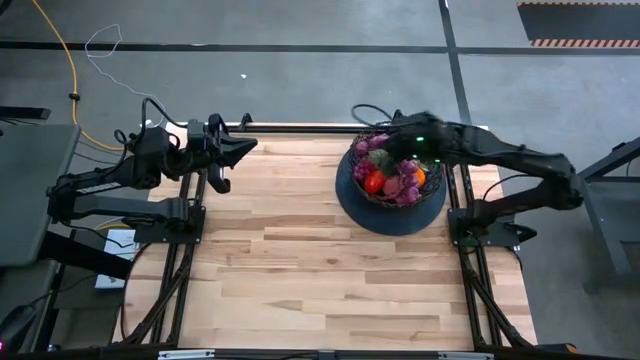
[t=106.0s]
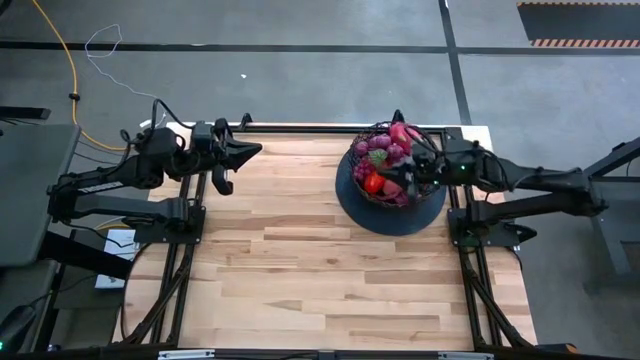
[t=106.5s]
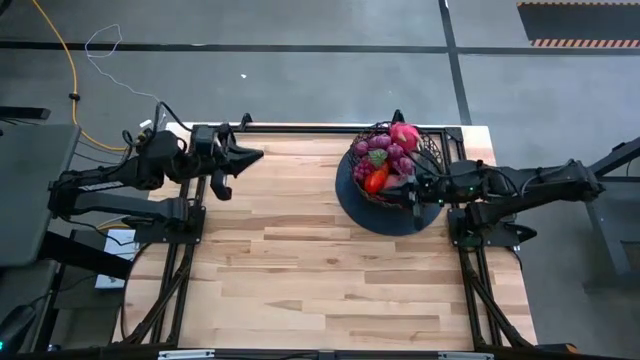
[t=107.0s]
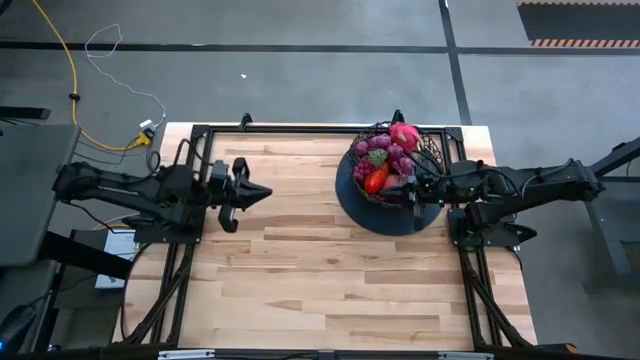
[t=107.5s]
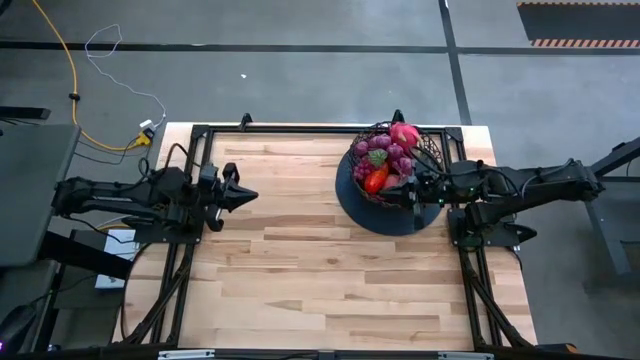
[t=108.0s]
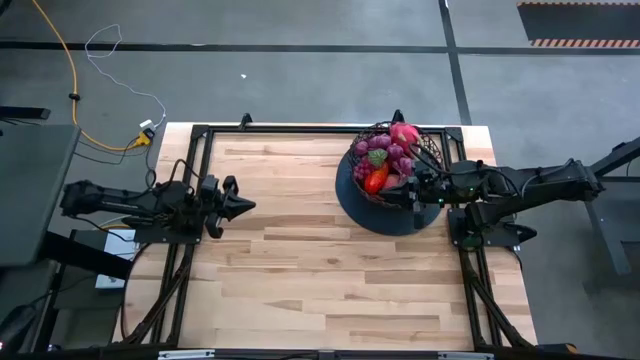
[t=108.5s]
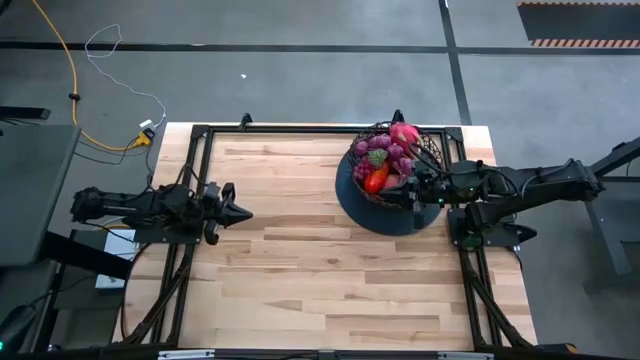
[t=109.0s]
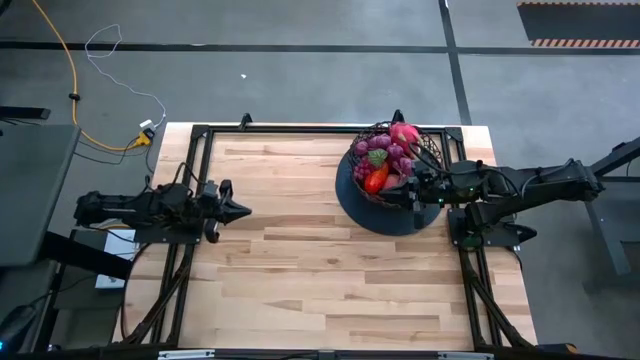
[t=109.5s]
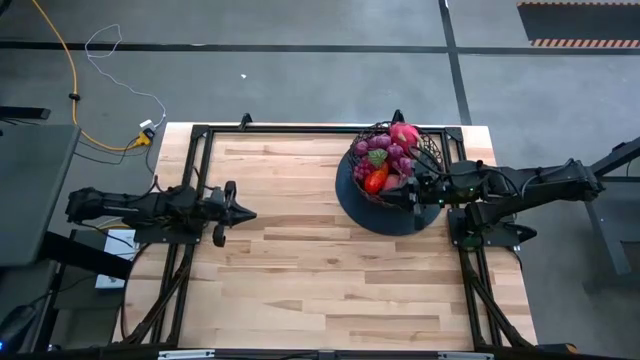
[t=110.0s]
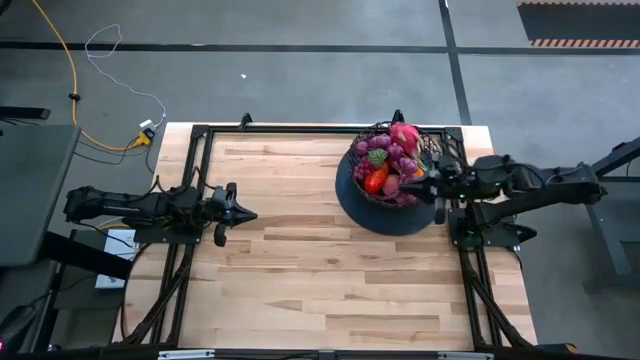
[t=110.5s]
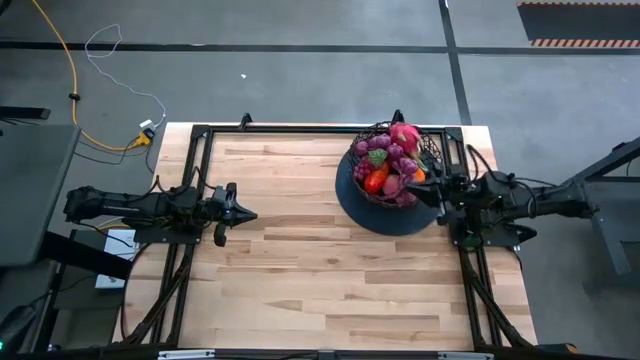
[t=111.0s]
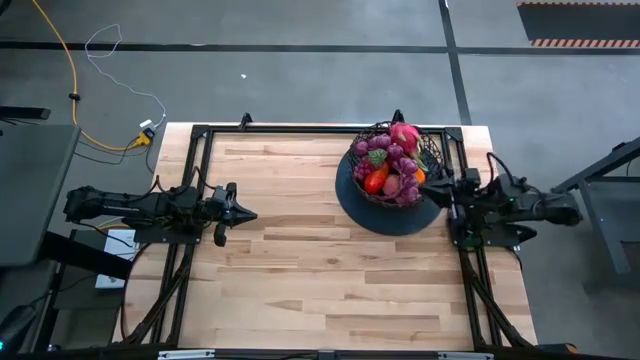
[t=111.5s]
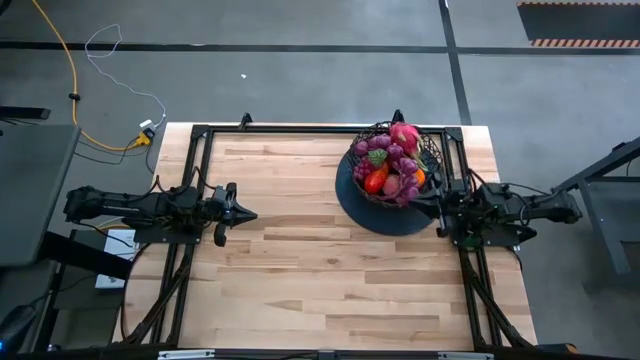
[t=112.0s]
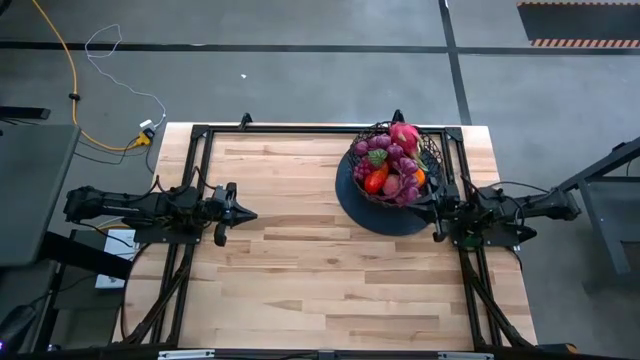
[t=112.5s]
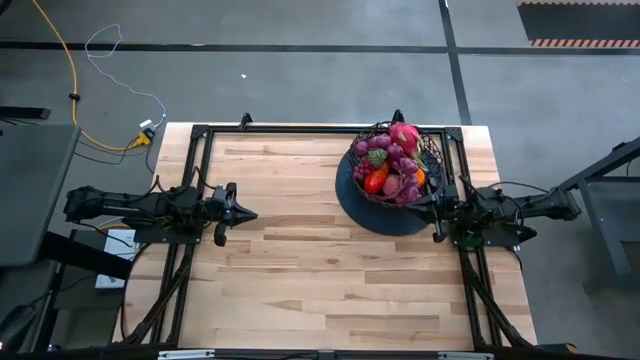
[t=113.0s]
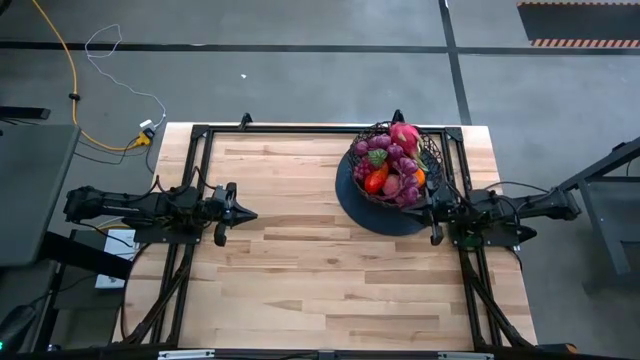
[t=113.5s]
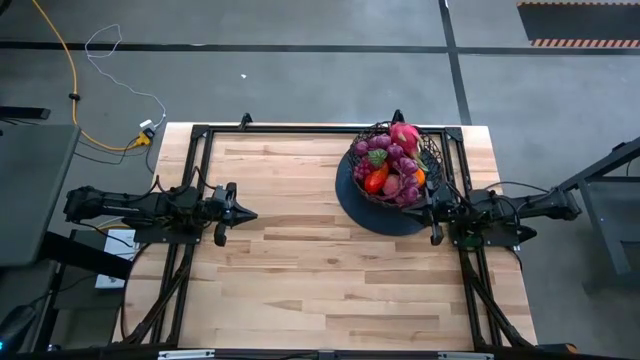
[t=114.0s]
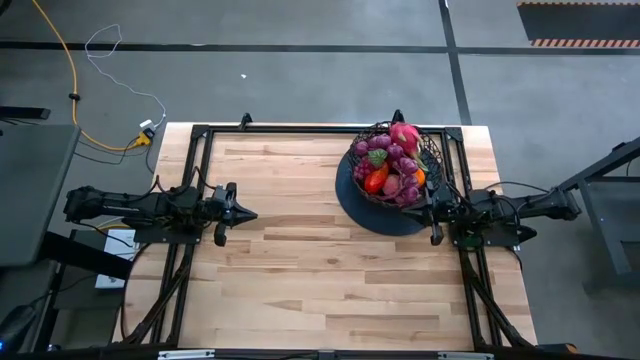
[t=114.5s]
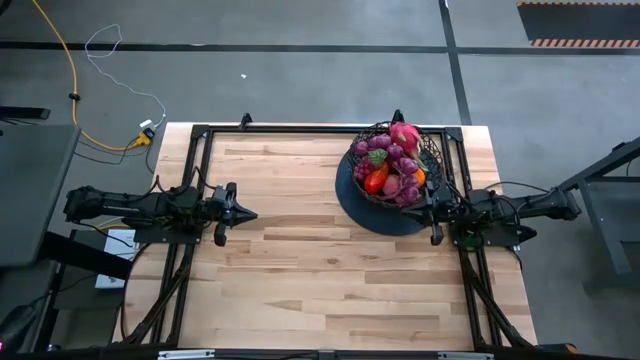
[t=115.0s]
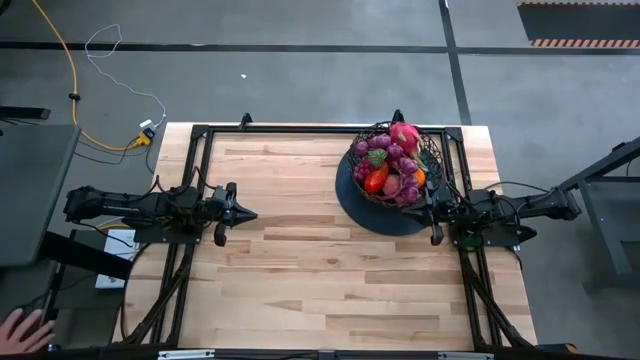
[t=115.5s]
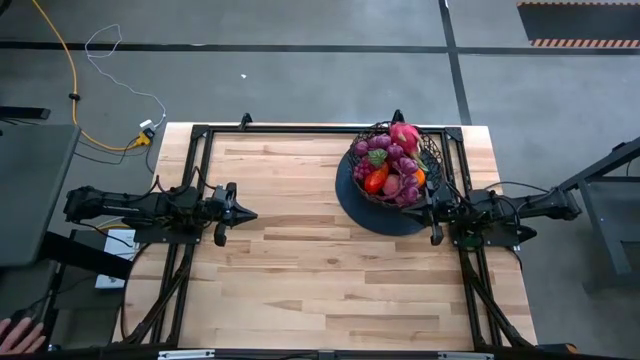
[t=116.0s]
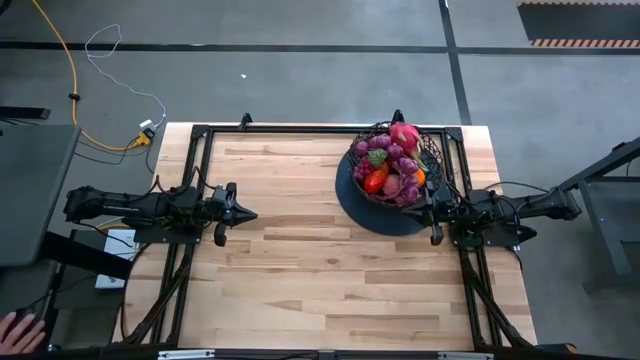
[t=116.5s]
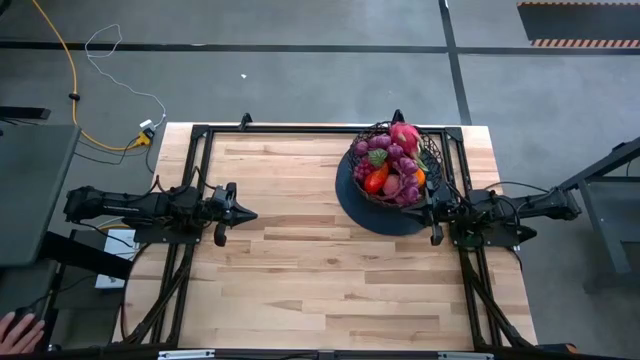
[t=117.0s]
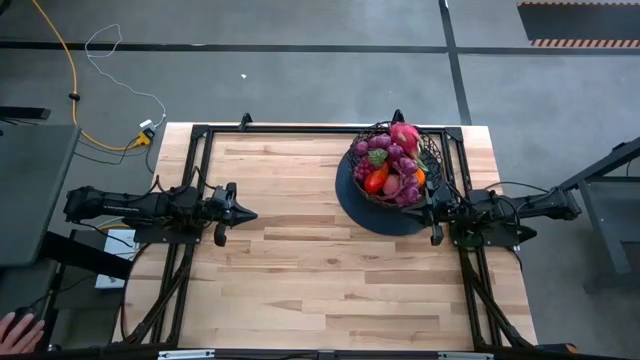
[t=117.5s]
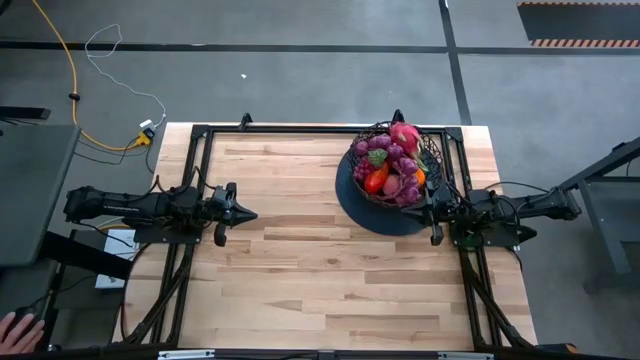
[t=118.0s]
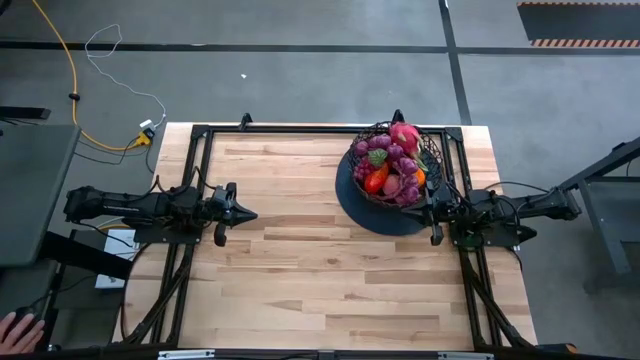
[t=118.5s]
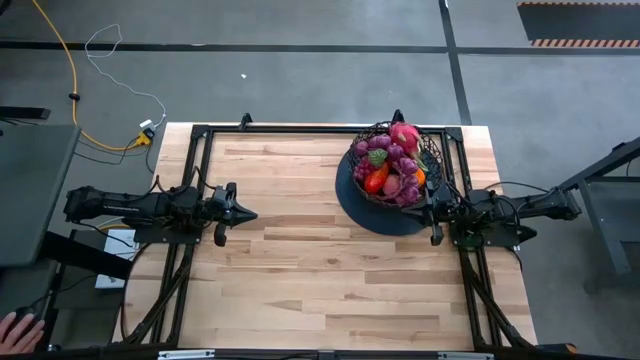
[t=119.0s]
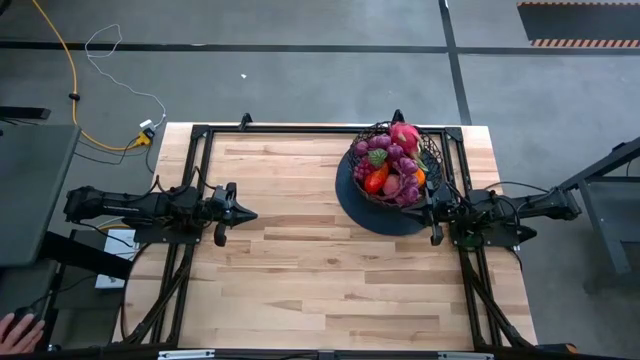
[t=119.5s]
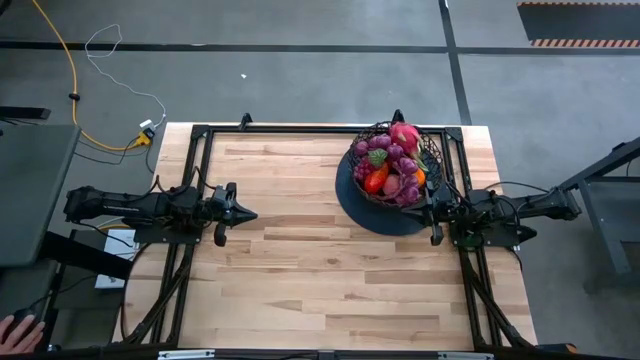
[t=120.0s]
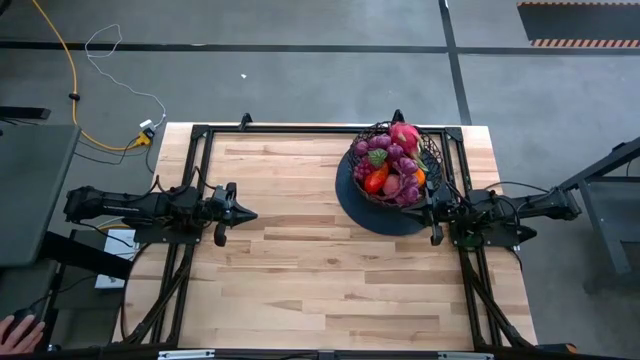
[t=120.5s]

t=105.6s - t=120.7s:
Task: Build produce basket
Return to Home Position

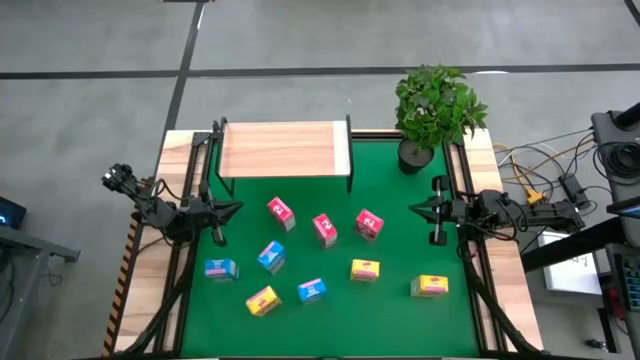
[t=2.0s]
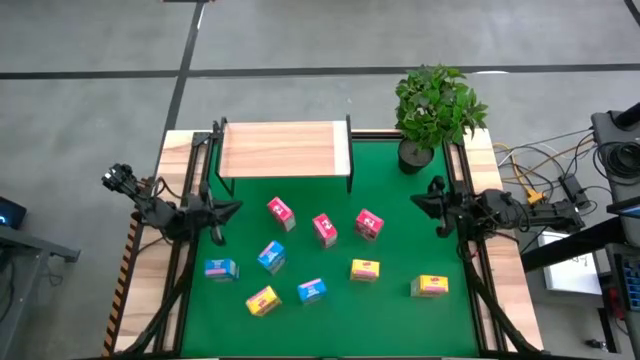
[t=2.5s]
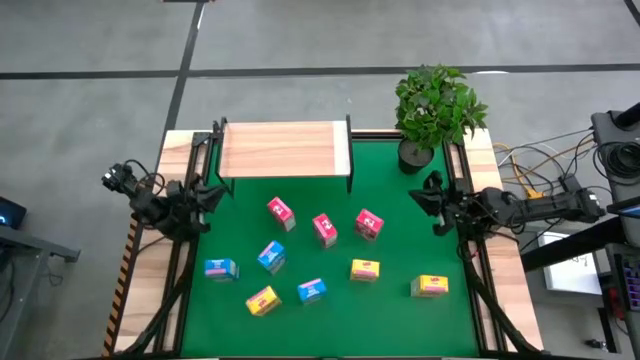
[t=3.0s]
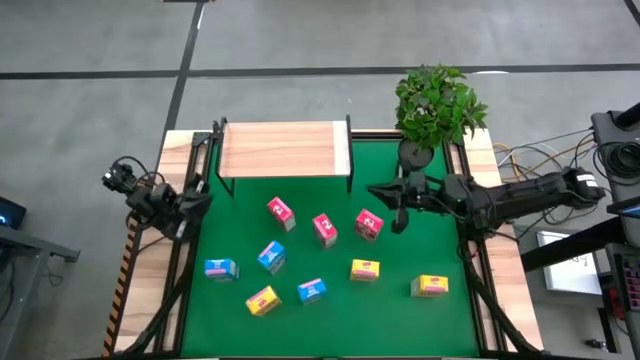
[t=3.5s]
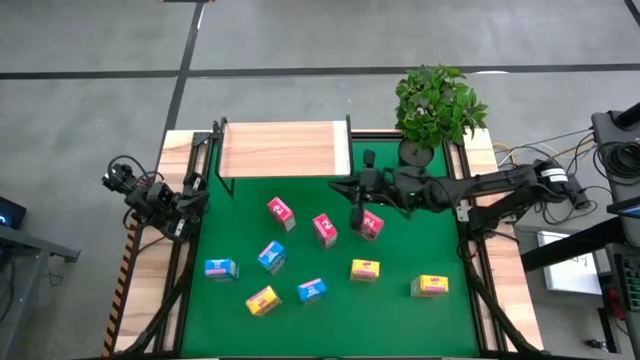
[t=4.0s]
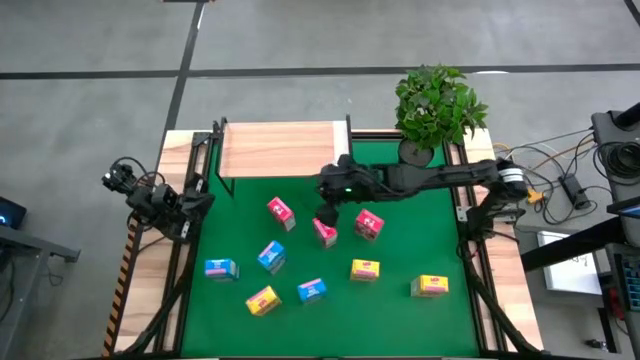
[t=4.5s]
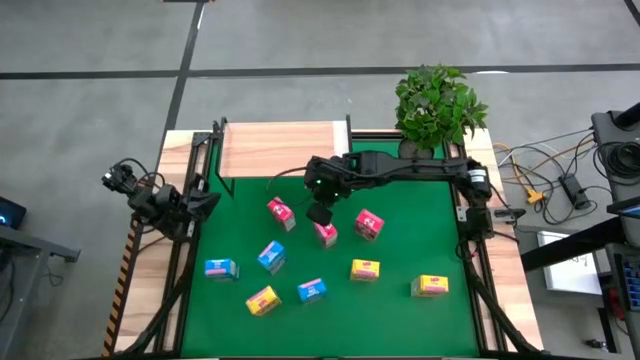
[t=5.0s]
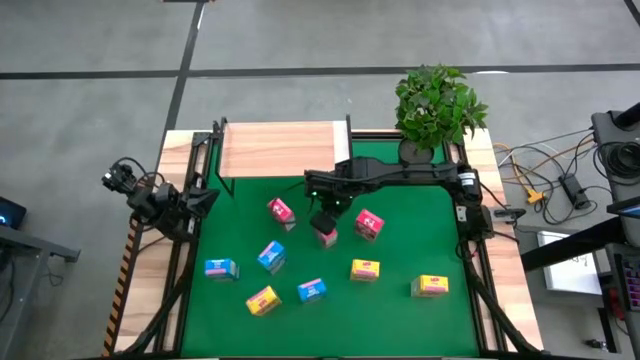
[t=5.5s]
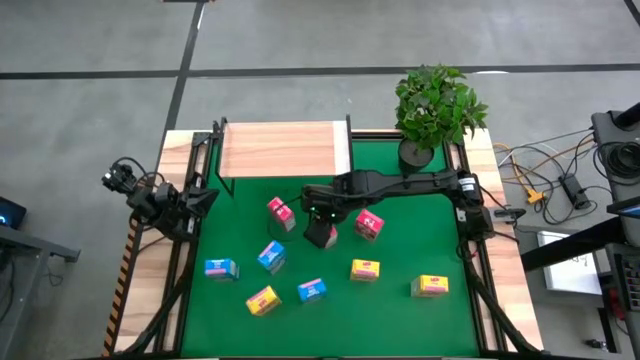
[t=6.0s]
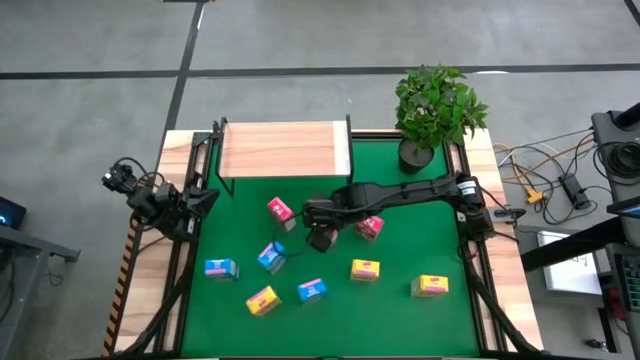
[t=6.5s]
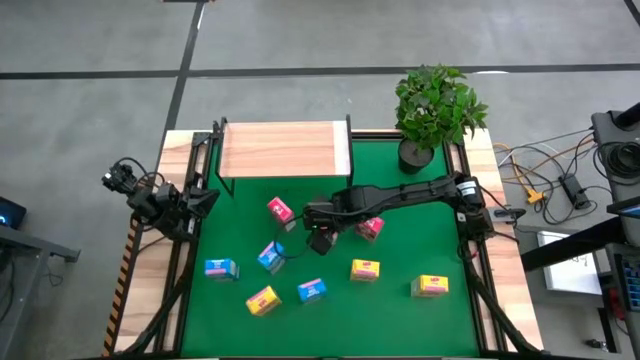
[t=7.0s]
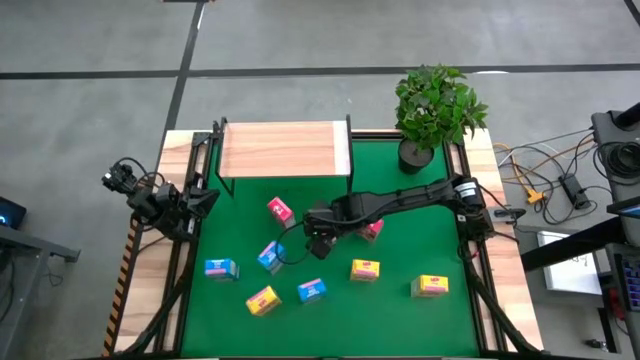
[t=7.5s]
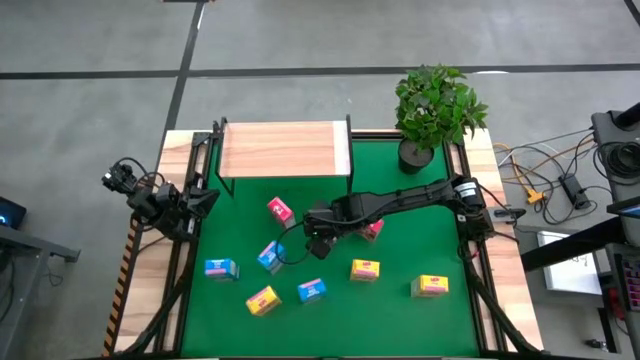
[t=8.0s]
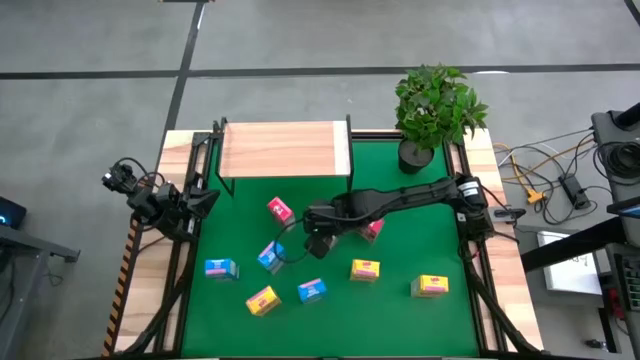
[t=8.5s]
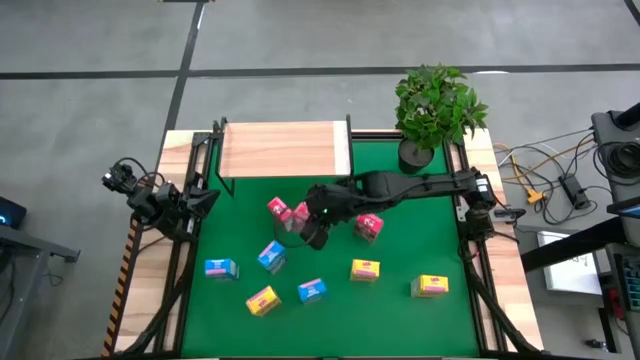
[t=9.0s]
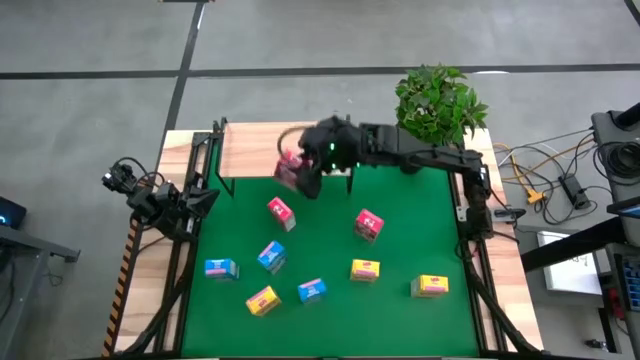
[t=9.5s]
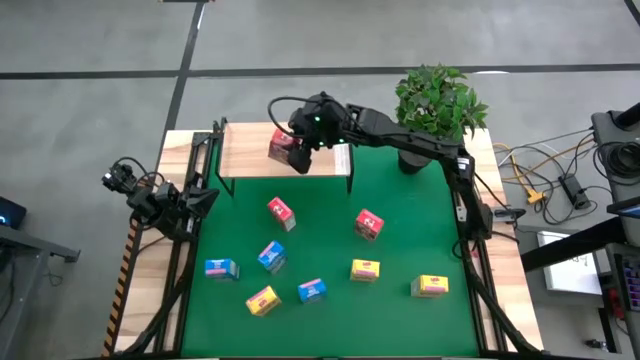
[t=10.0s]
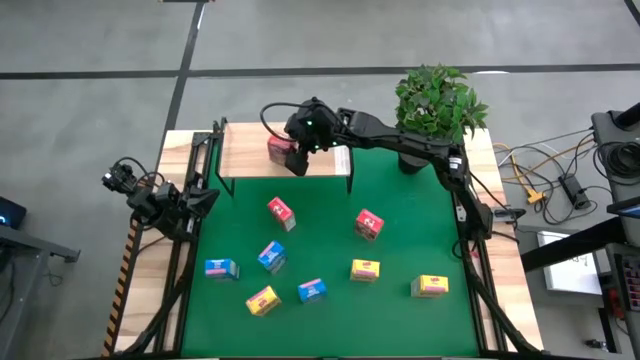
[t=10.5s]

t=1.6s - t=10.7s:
Task: Stack cereal on shelf
Put the center red cereal on the shelf
